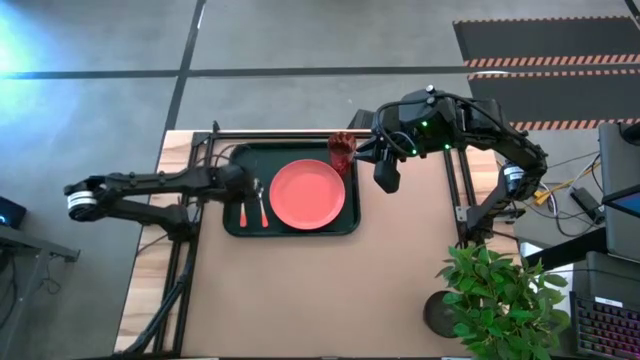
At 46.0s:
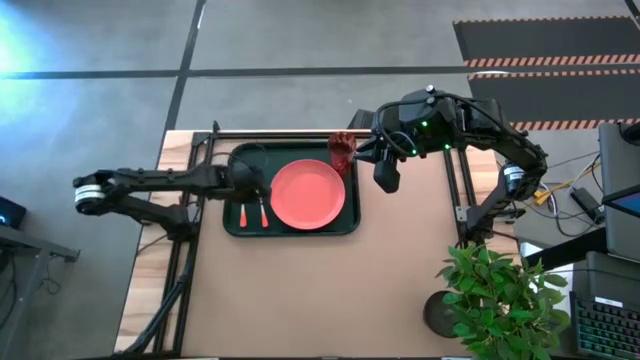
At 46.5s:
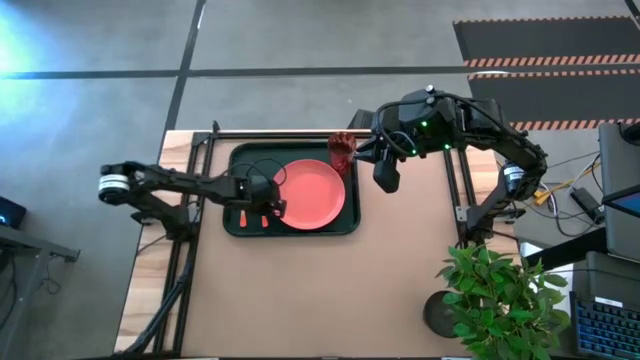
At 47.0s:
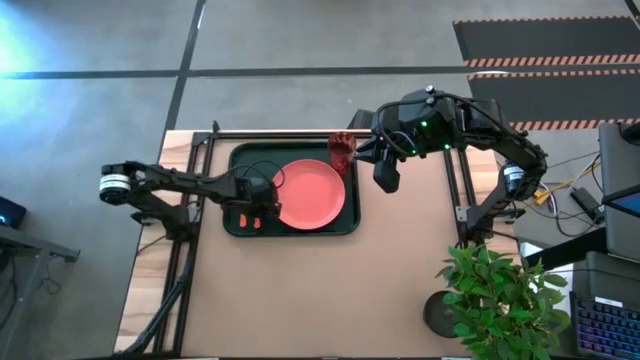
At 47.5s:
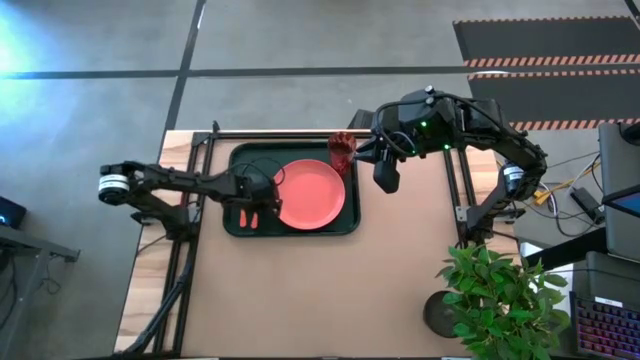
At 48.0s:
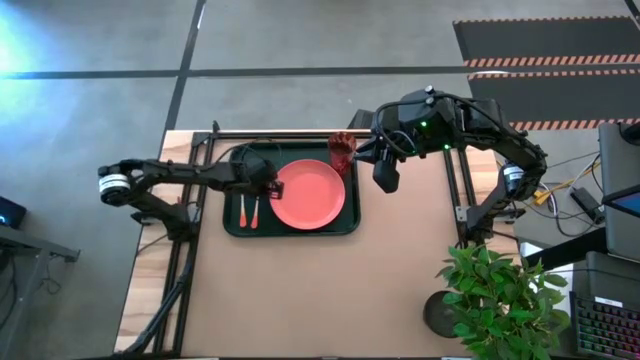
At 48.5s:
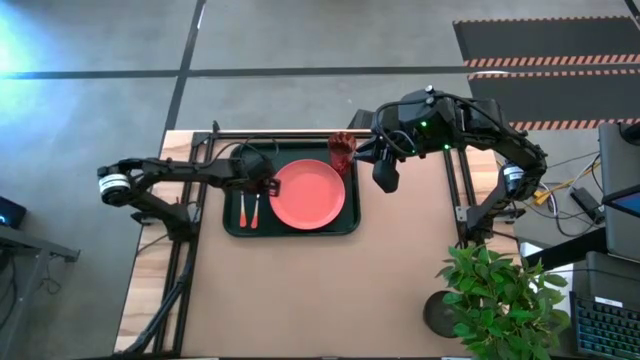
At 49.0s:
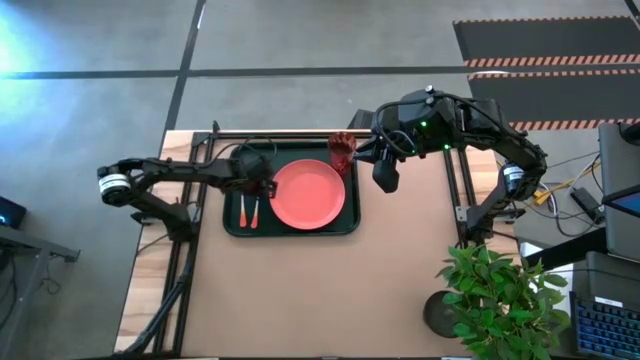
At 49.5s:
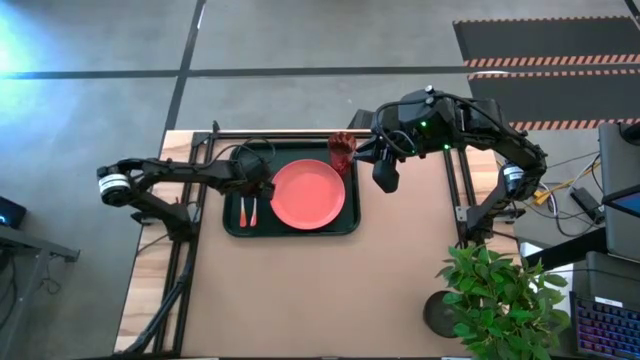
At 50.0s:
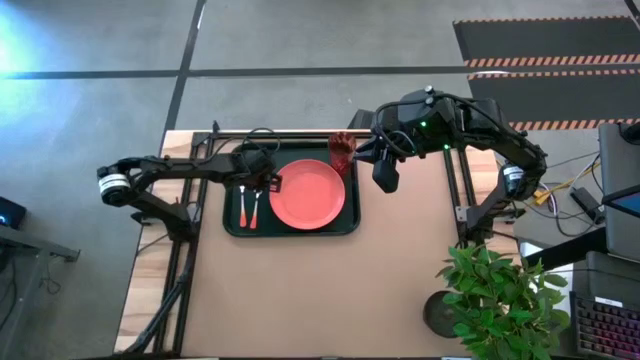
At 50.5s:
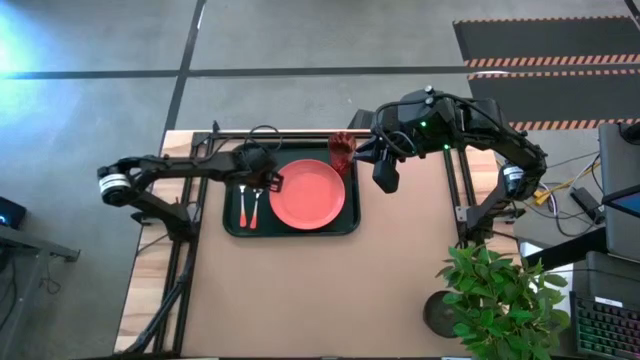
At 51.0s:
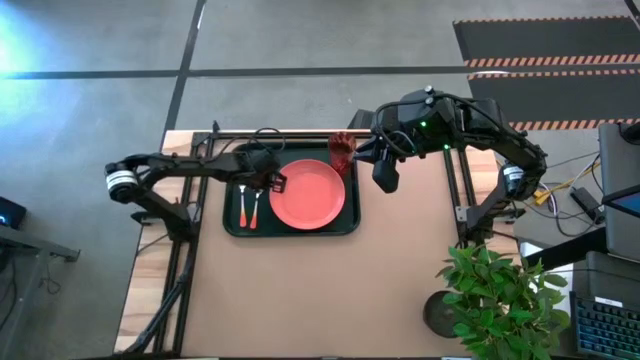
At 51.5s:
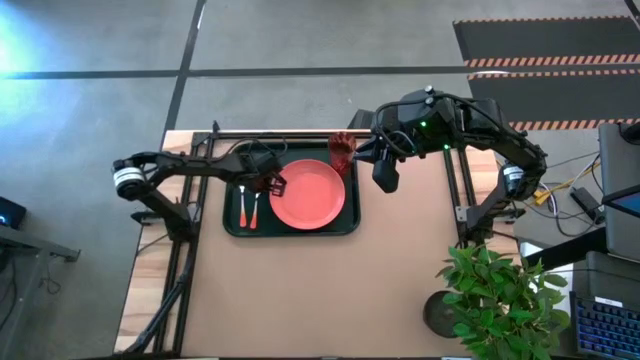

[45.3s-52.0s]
Task: Pick and place plate/cup/fork/spoon on tray
Adjust the orange spoon on the black tray

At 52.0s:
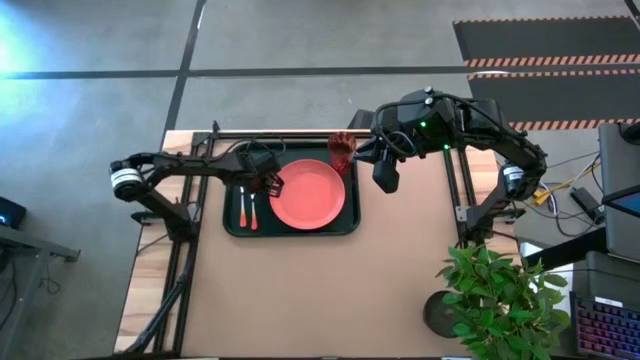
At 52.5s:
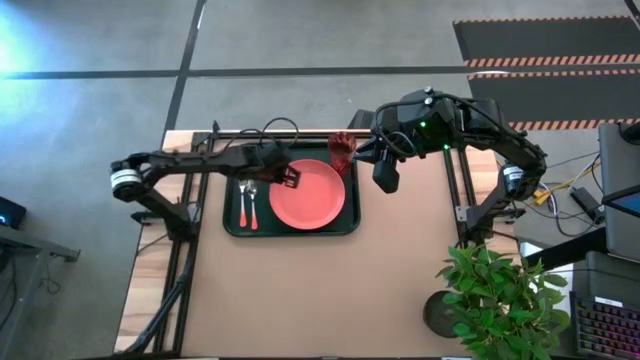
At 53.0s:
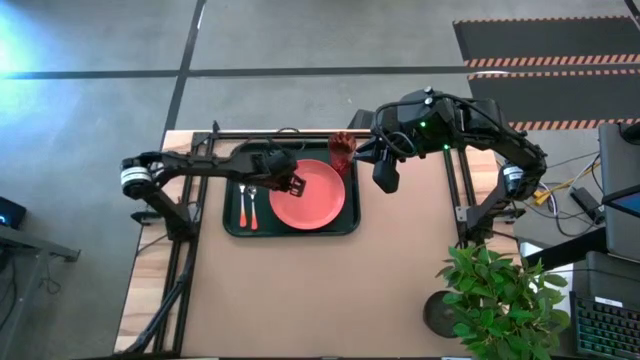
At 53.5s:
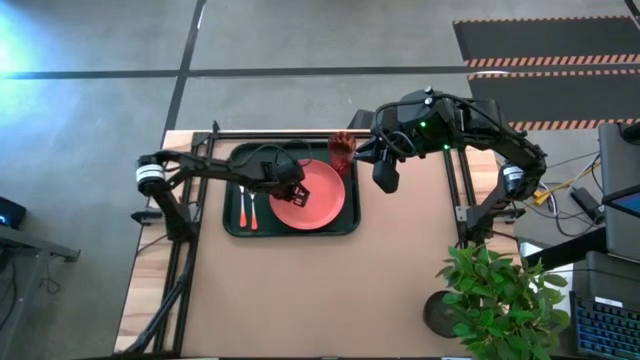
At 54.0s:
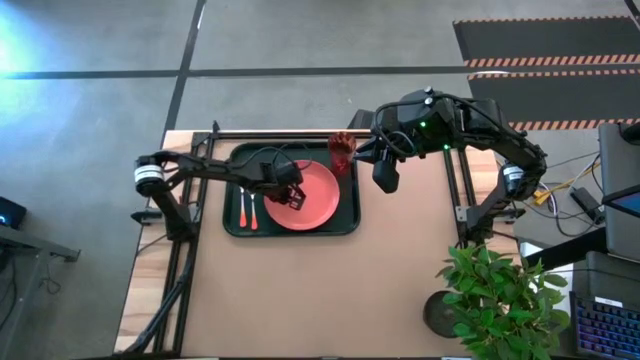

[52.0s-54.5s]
Adjust the orange plate on the black tray

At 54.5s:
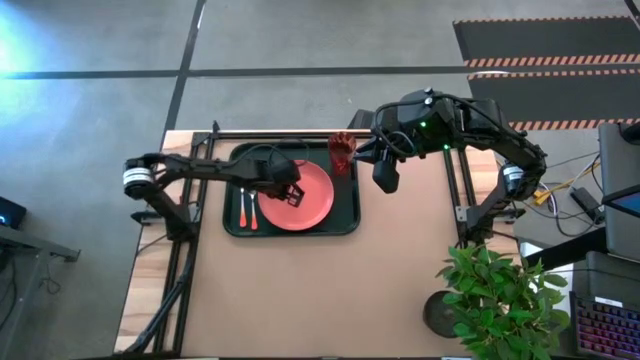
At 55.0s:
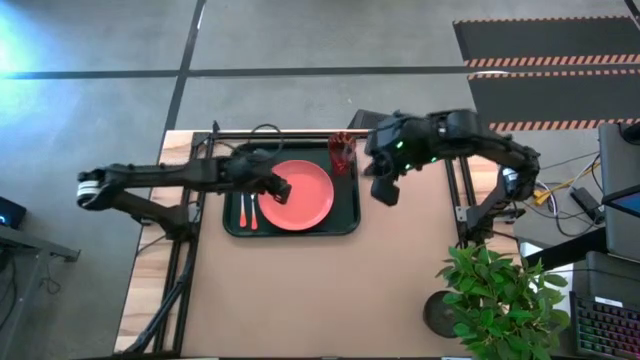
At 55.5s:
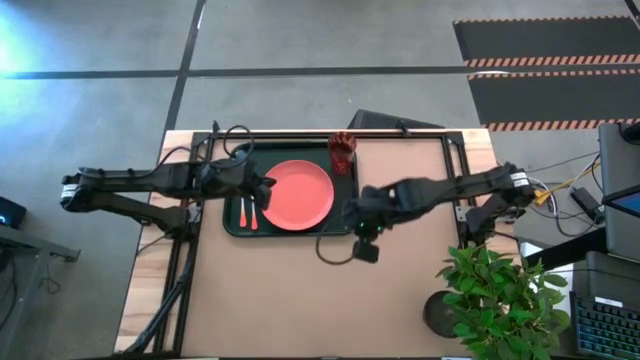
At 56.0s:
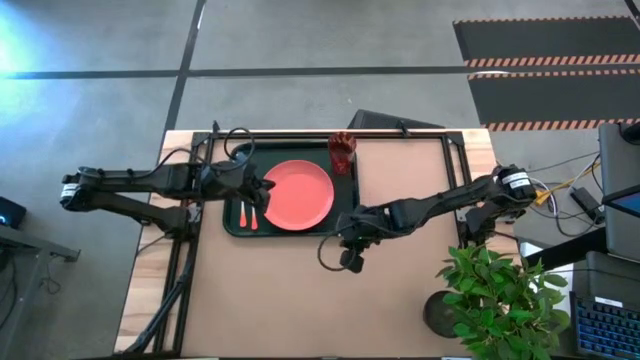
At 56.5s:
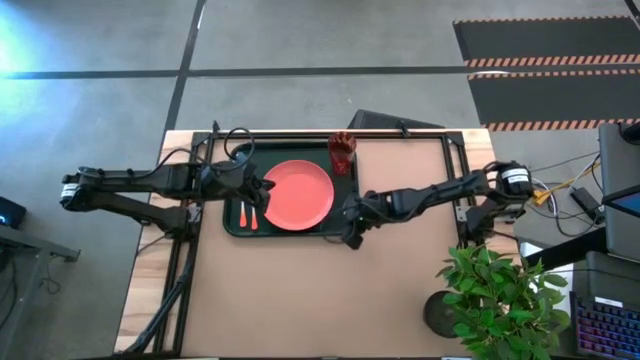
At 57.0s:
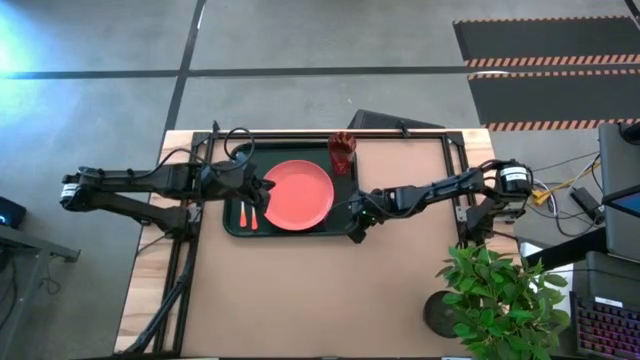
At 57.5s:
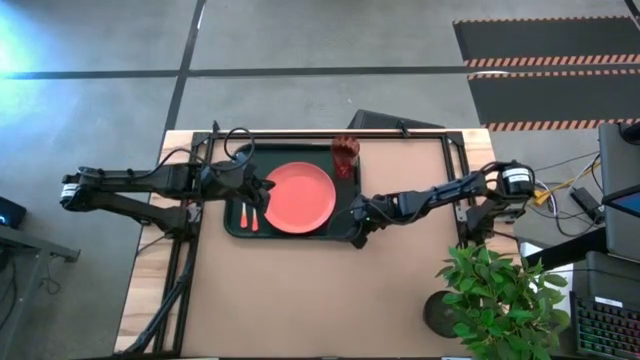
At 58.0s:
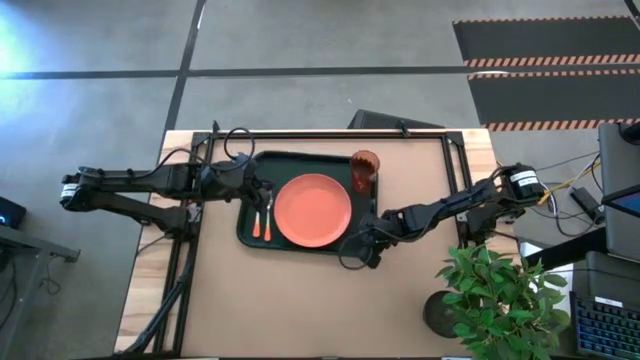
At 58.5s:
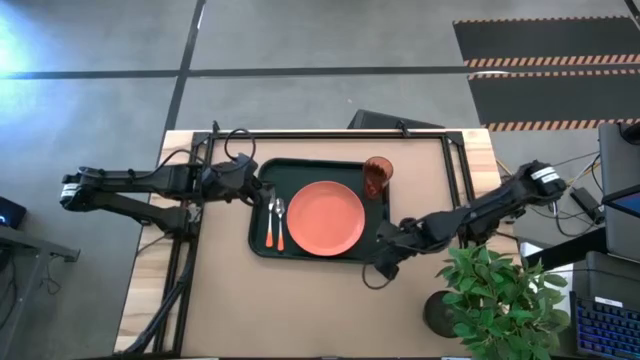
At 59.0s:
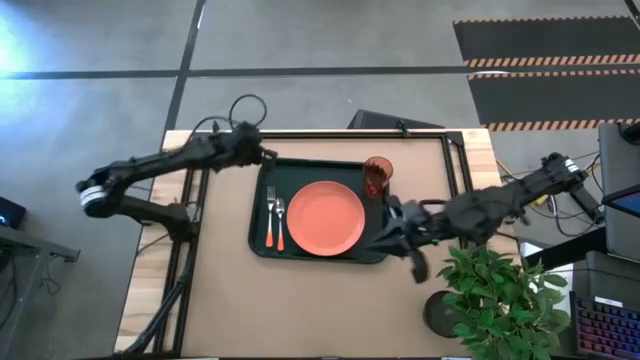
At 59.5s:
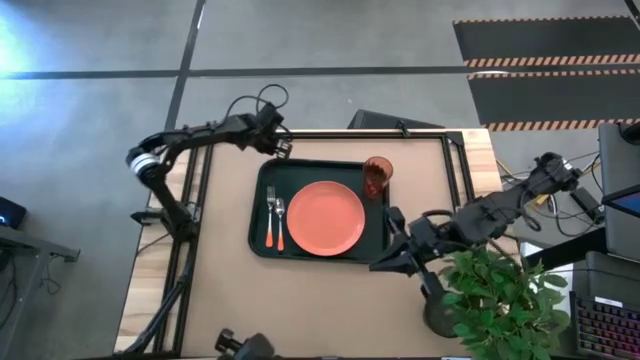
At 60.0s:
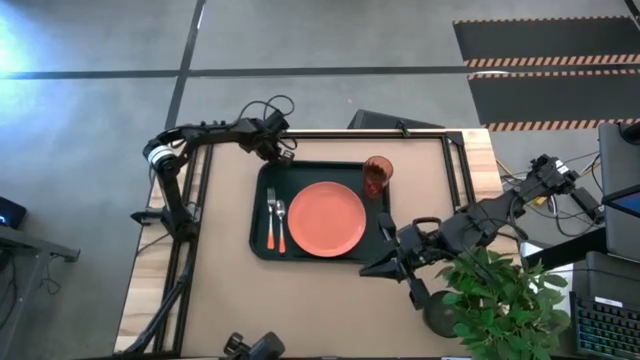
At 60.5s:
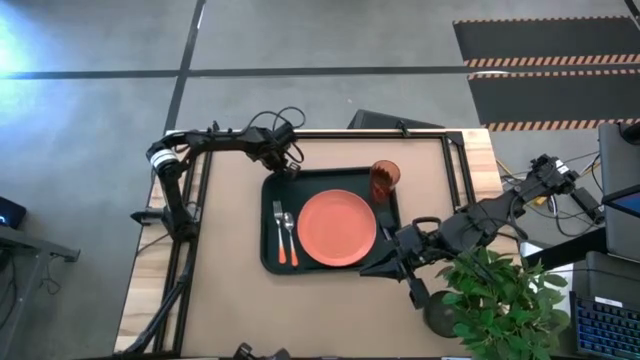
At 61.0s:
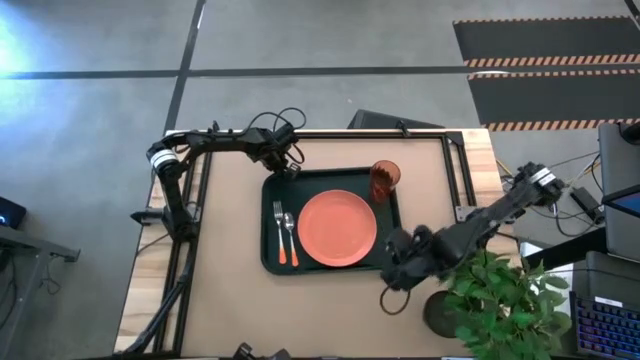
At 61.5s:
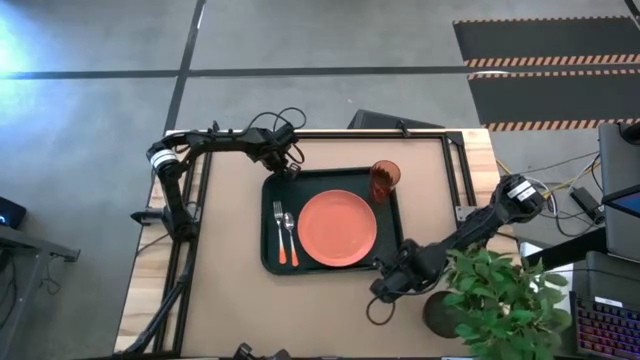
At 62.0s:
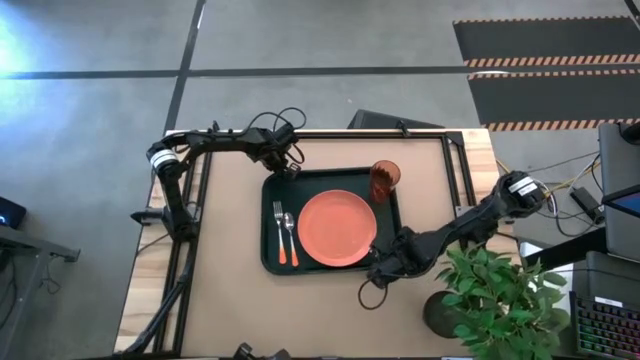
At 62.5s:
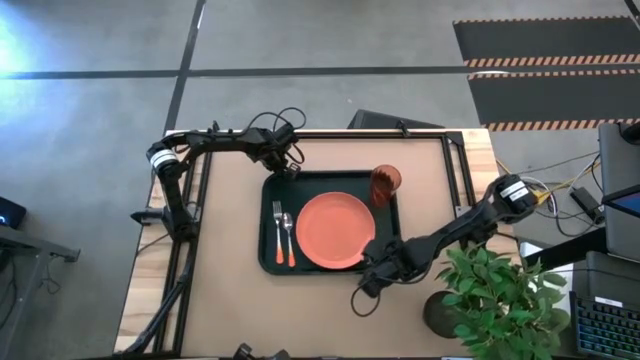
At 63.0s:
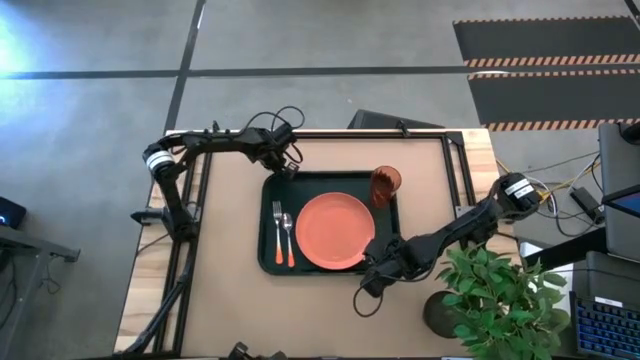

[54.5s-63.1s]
Move the black tray to the center of the table

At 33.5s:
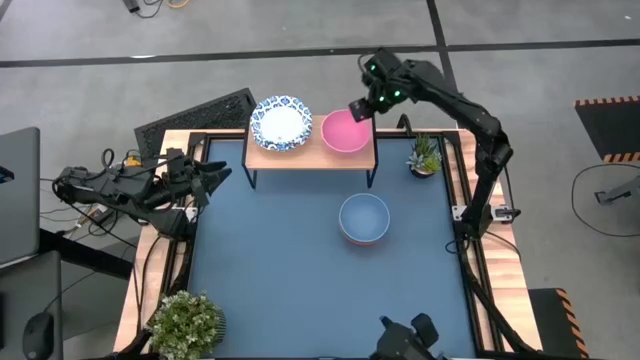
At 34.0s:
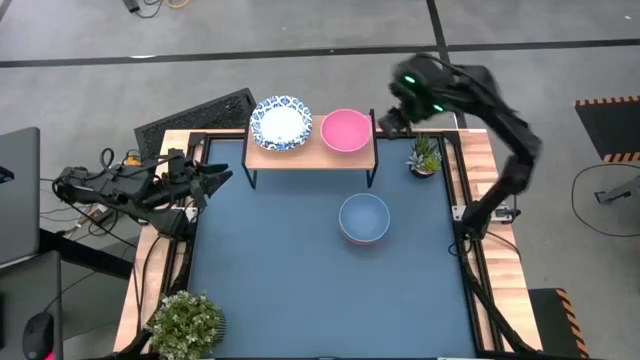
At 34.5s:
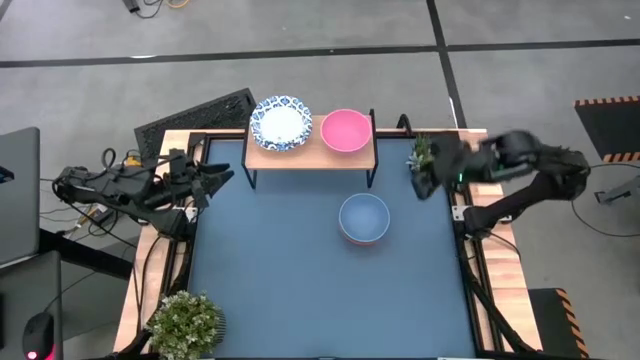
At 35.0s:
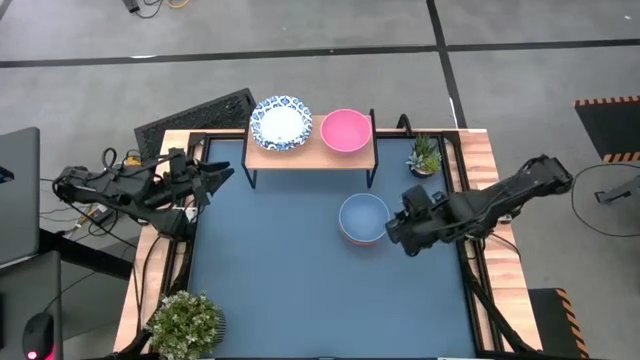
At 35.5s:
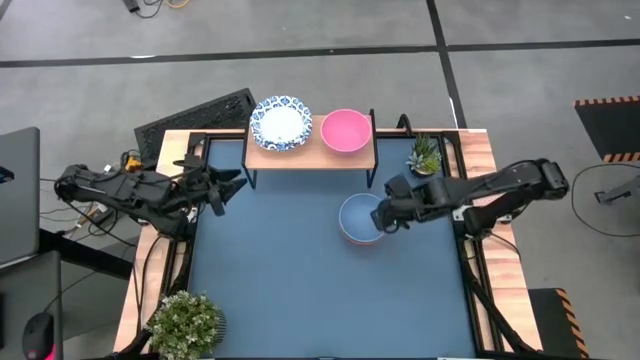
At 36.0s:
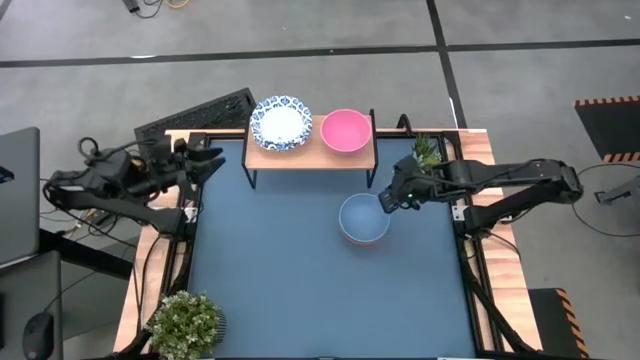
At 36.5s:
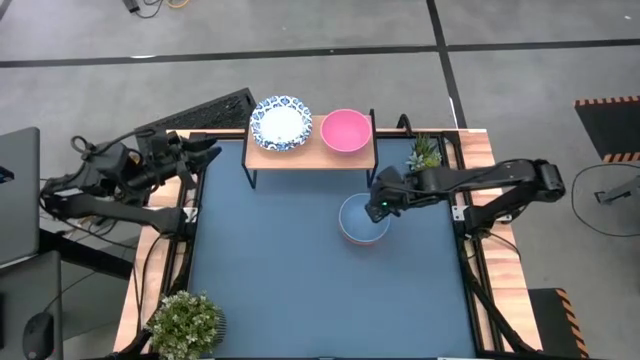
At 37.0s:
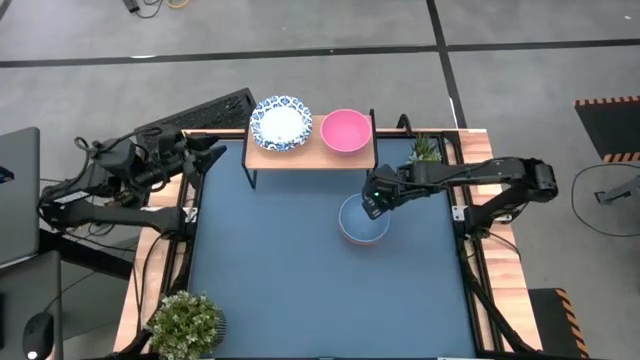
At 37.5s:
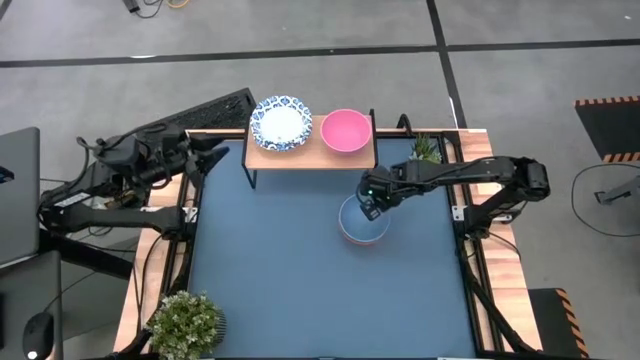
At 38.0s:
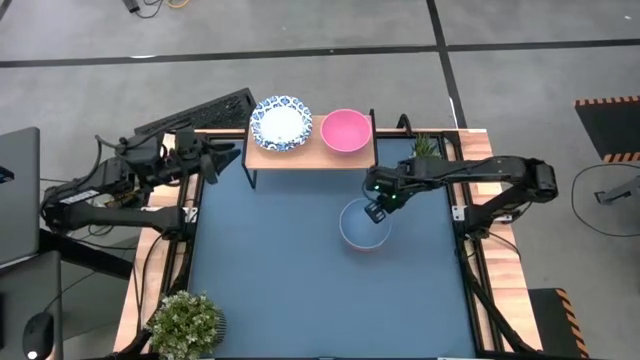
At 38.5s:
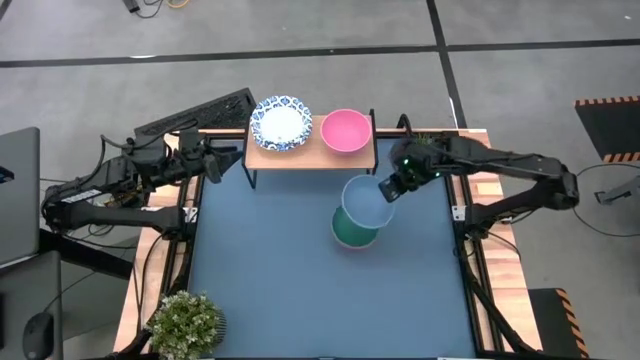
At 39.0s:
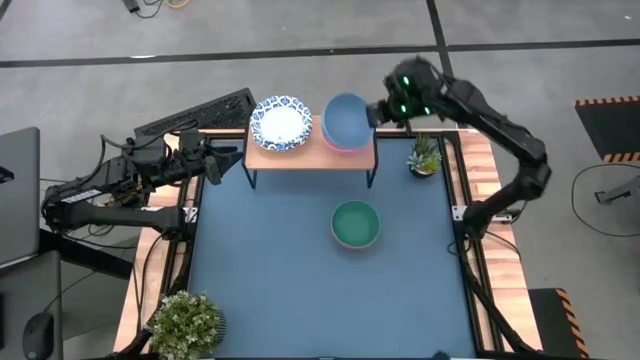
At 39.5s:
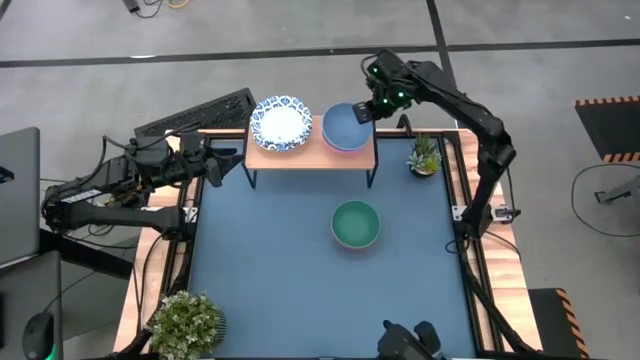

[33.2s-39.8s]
Task: Place and stack bowls onto a shelf
Stack the blue bowl on the pink bowl on the shelf
